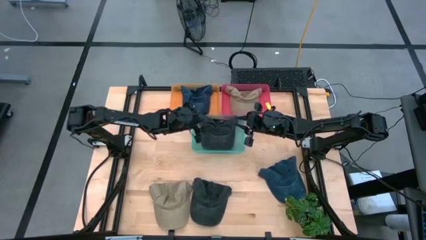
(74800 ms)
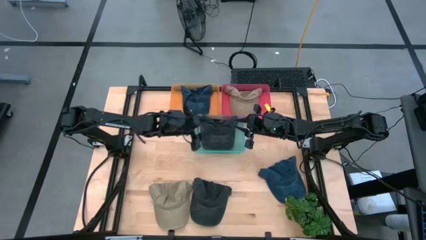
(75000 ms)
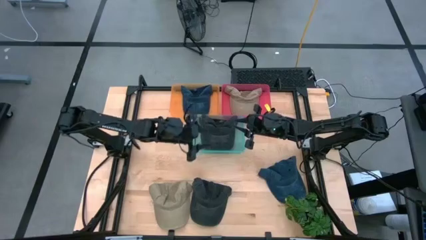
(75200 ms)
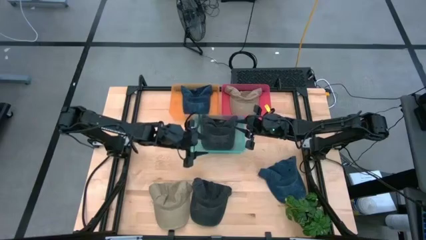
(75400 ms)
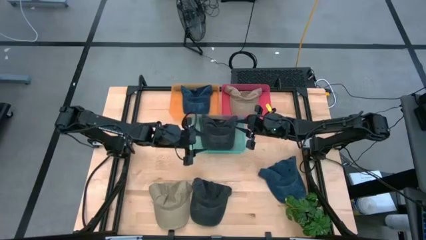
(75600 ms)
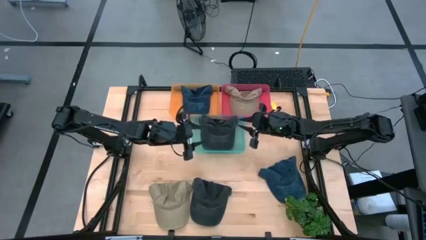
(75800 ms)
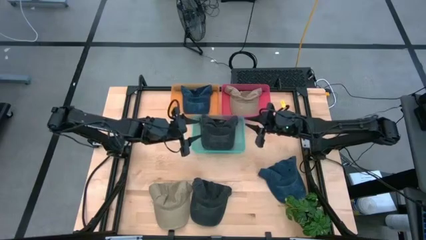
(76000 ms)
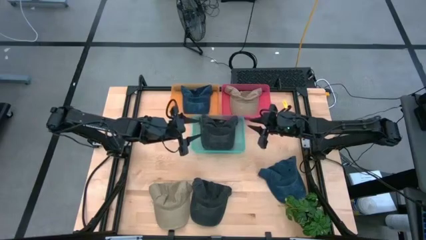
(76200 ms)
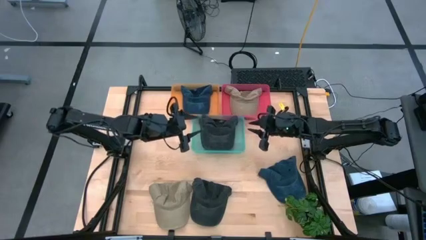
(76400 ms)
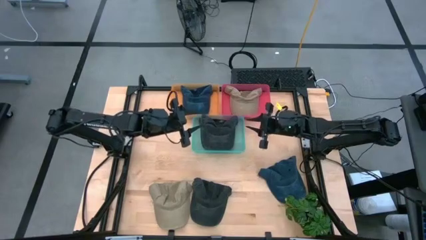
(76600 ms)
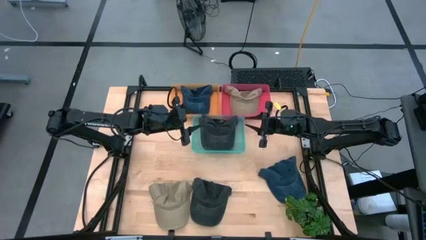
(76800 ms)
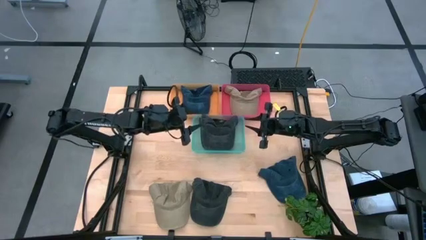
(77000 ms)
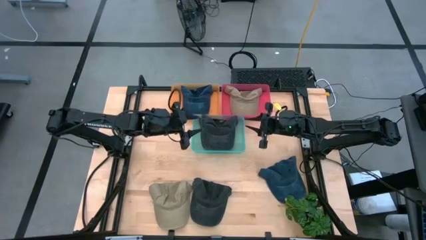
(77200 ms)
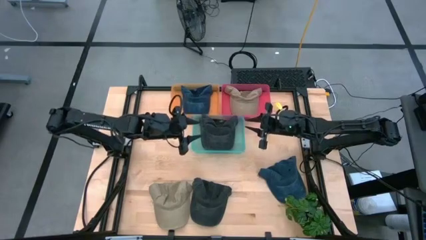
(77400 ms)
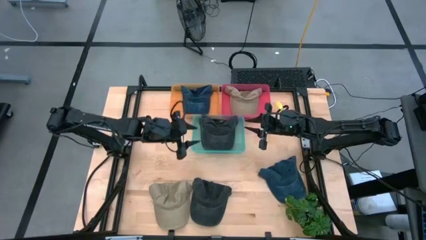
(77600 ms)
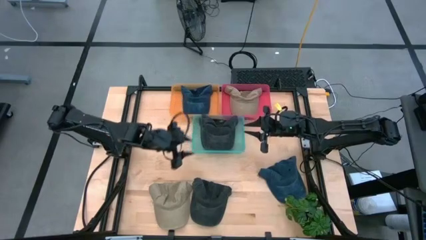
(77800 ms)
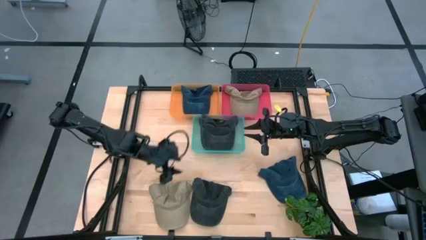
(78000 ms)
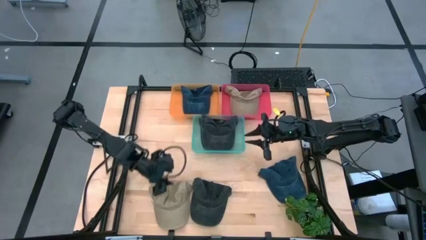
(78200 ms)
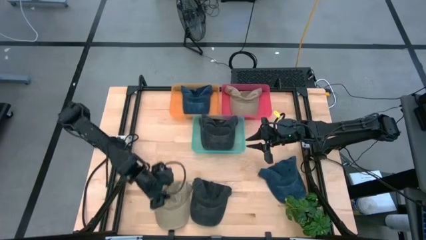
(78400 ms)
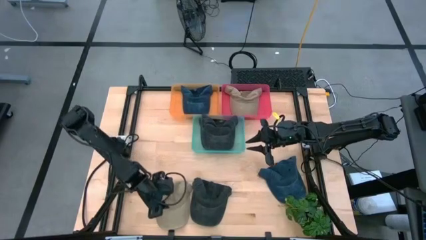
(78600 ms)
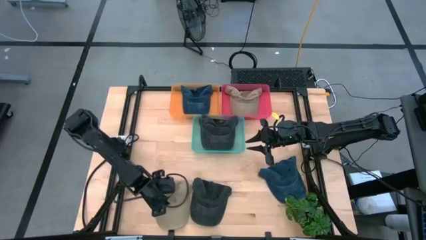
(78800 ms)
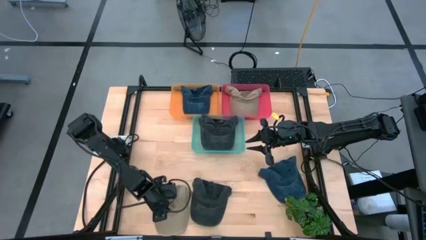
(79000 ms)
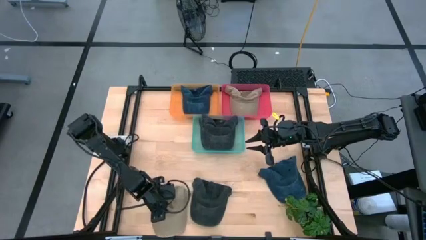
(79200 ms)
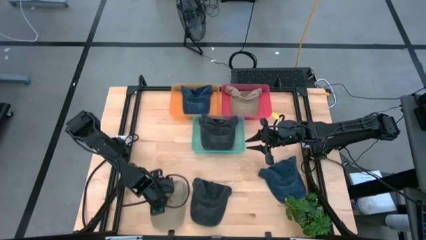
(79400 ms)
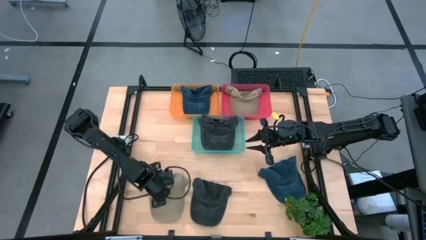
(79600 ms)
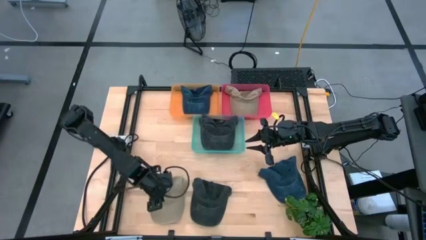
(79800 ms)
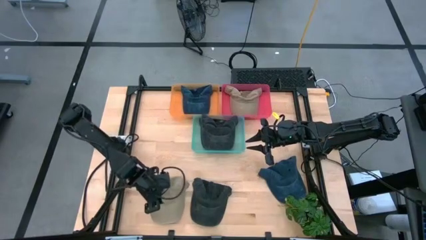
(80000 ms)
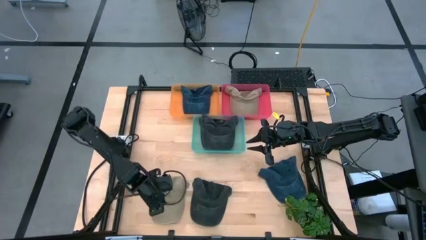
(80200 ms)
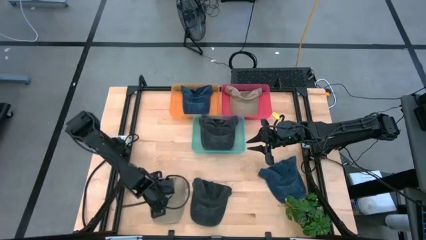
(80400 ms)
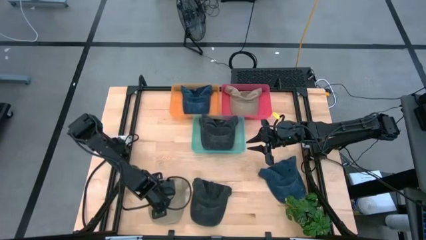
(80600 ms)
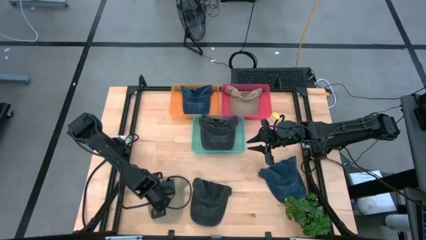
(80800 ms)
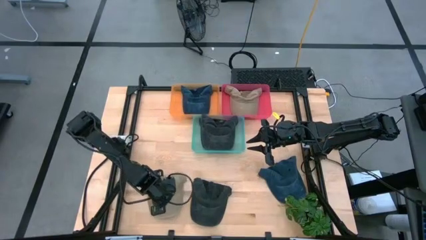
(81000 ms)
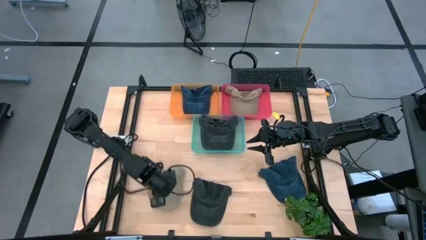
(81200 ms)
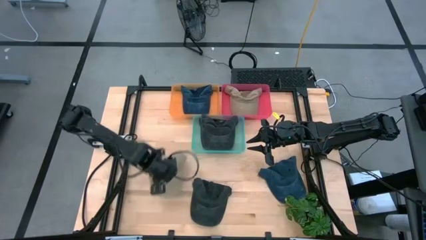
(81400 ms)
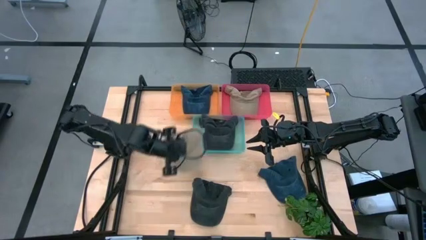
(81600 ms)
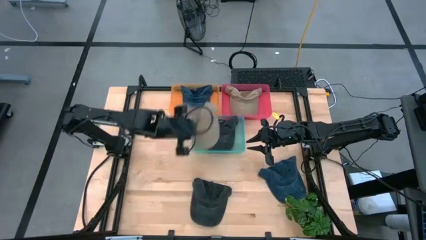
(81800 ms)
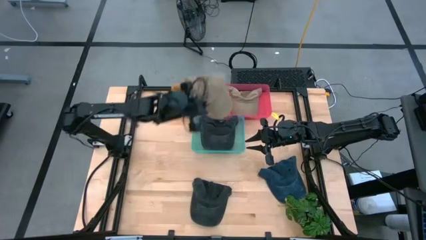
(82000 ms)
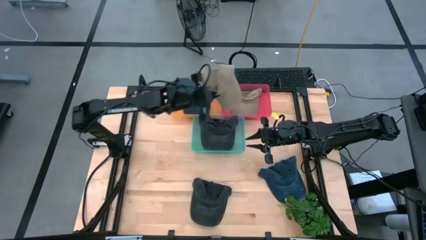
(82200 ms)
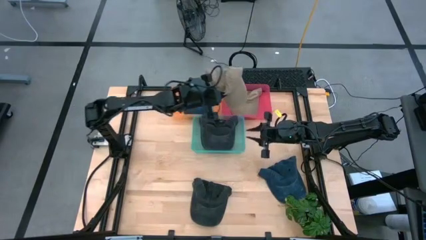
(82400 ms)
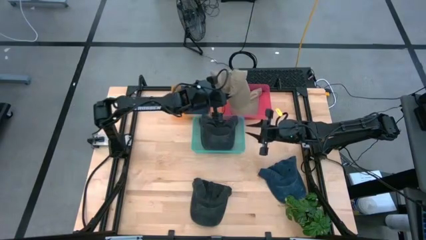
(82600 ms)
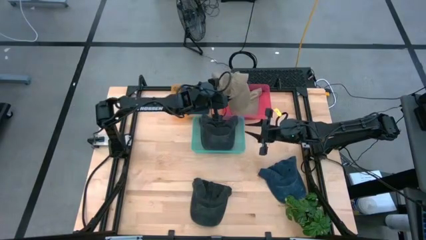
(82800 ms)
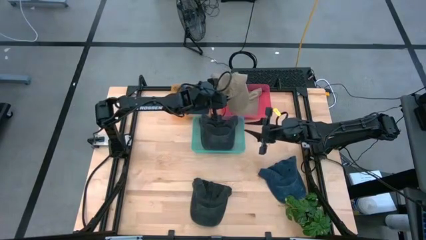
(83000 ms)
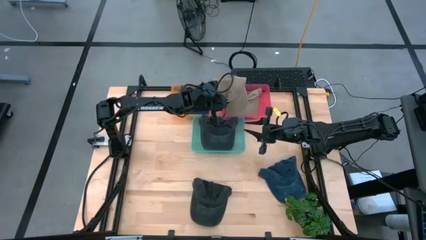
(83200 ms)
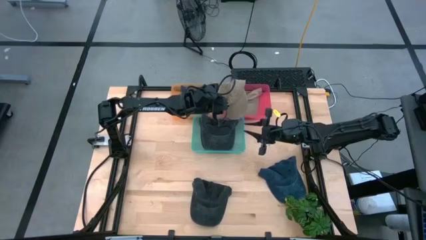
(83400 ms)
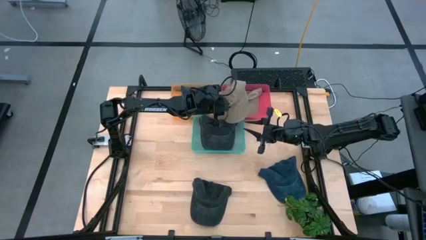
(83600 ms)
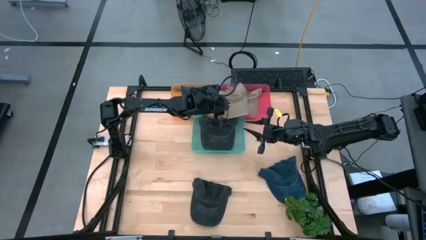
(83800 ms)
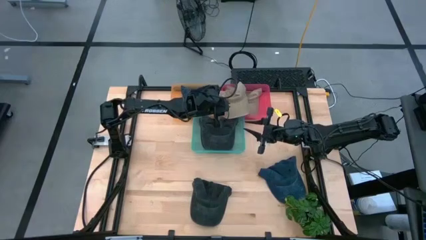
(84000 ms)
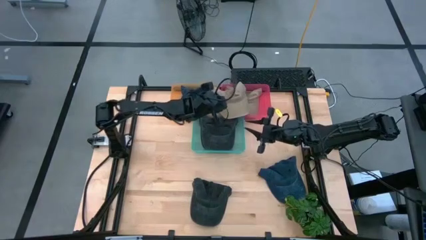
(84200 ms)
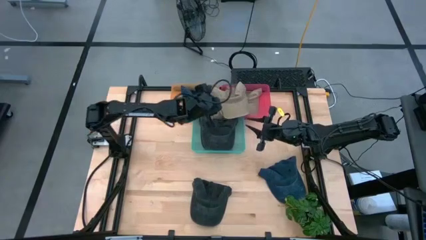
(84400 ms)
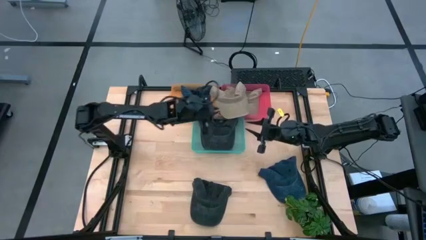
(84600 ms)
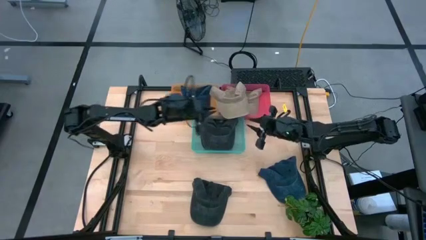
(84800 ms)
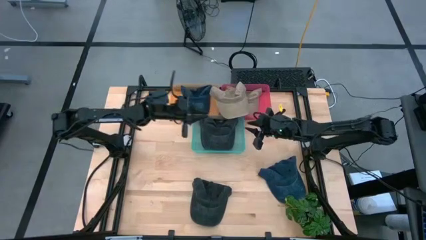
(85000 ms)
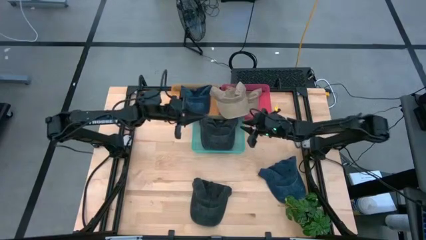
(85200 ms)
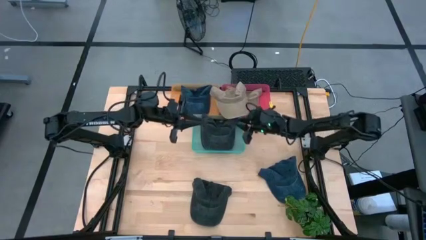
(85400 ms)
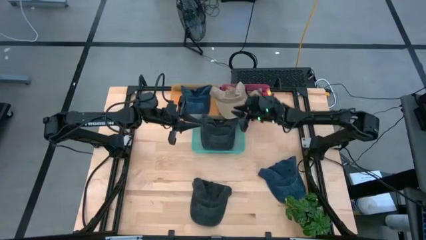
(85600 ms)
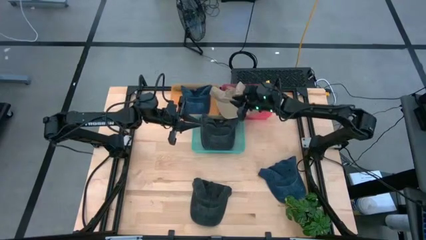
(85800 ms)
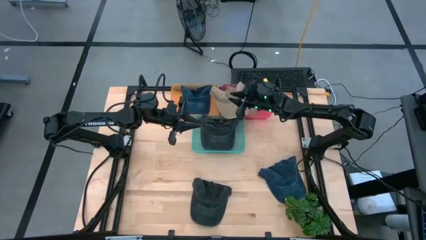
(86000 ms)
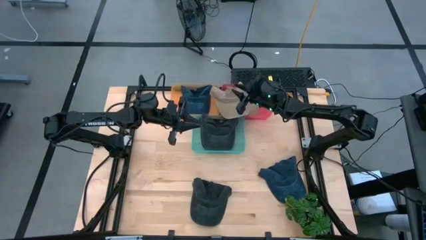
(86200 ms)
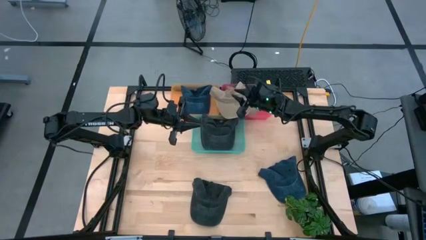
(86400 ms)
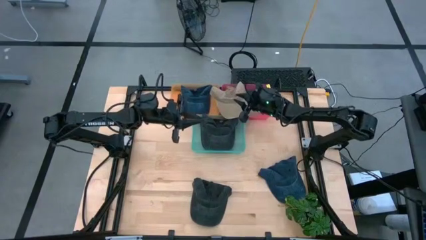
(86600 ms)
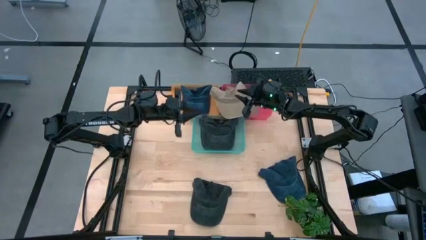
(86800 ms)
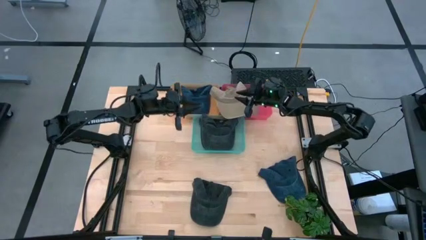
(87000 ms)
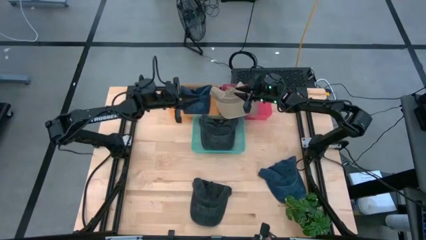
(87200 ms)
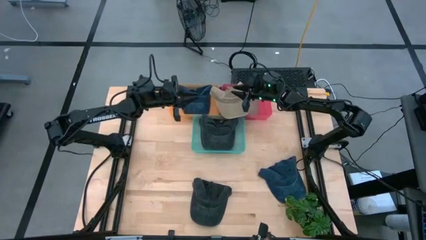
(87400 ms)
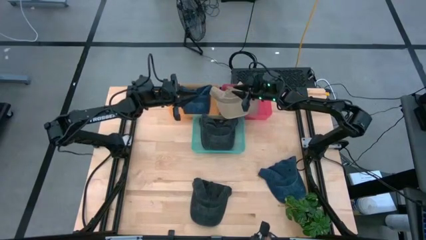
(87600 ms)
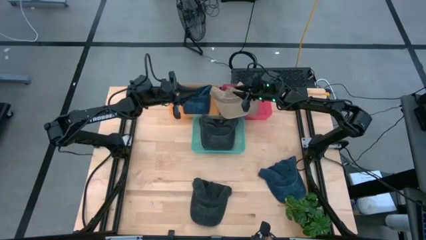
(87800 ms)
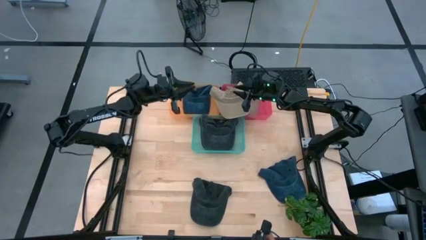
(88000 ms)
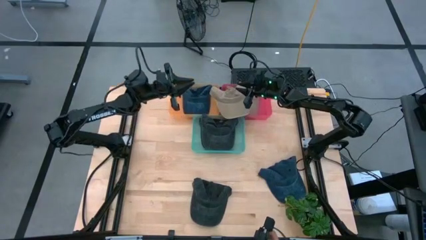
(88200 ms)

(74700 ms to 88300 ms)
Task: Pick & Place hat
Put the brown cap into the pink bin

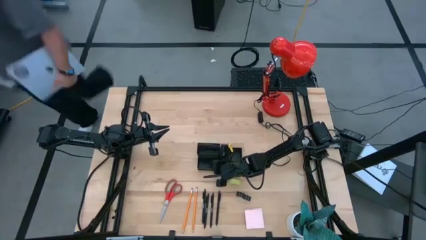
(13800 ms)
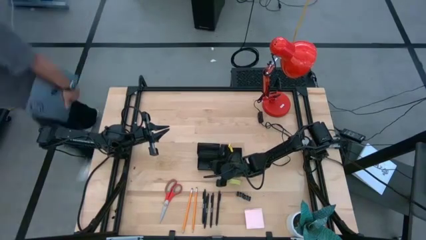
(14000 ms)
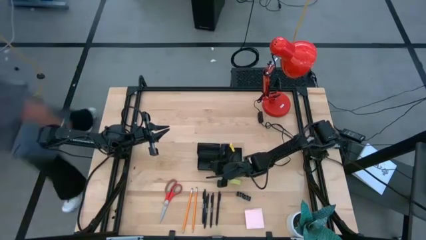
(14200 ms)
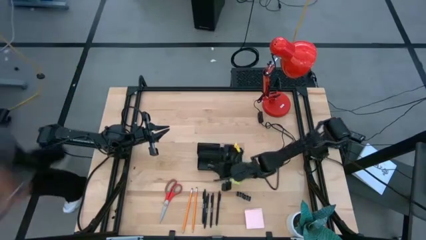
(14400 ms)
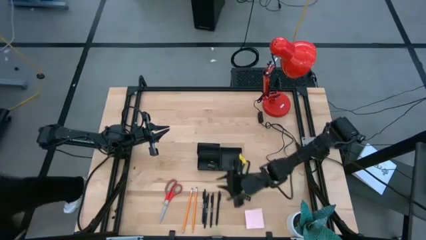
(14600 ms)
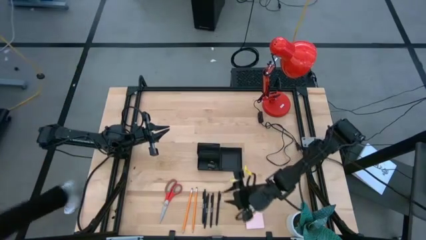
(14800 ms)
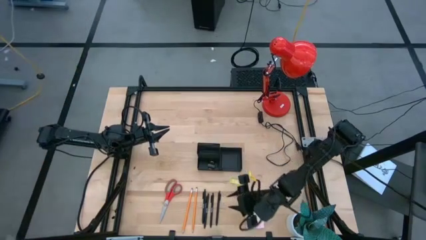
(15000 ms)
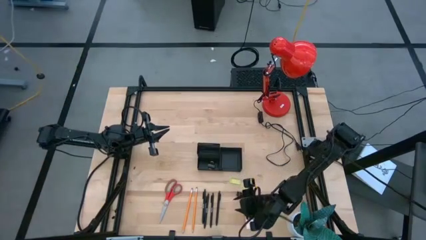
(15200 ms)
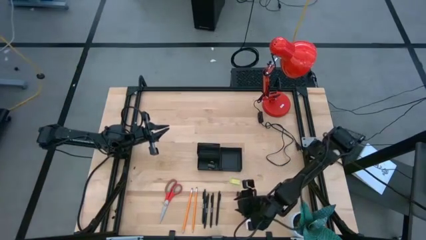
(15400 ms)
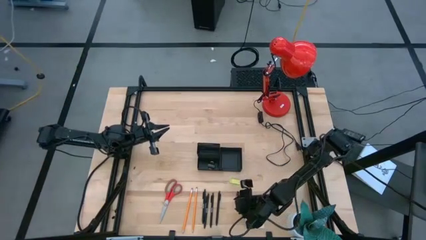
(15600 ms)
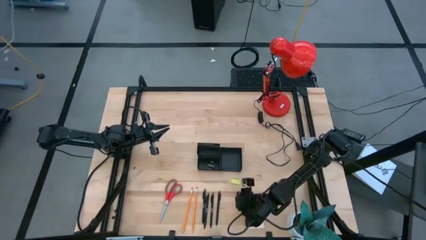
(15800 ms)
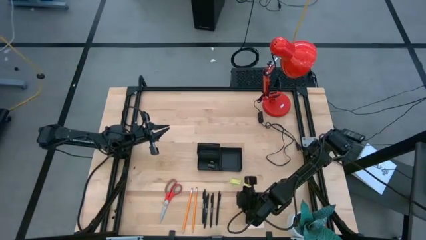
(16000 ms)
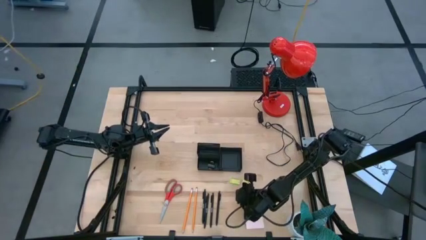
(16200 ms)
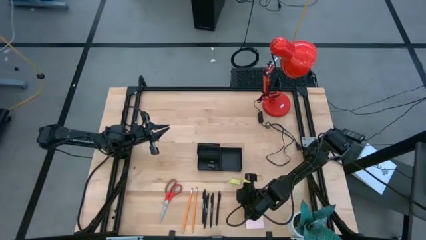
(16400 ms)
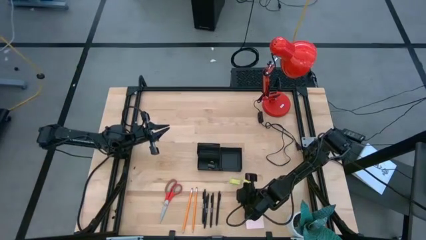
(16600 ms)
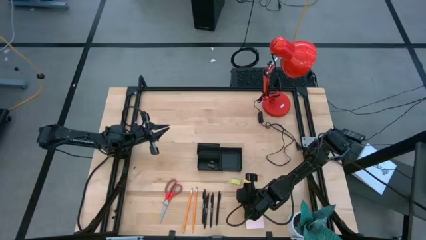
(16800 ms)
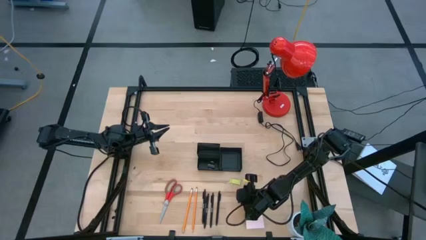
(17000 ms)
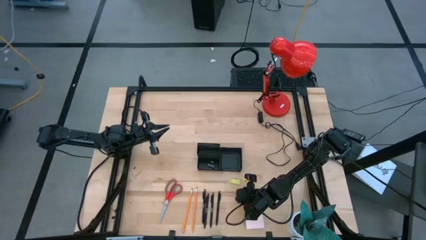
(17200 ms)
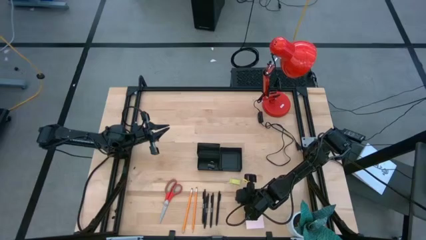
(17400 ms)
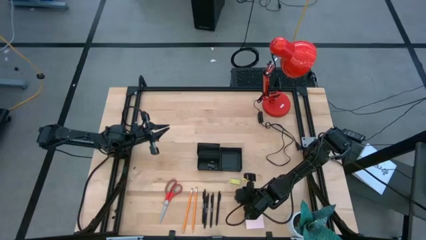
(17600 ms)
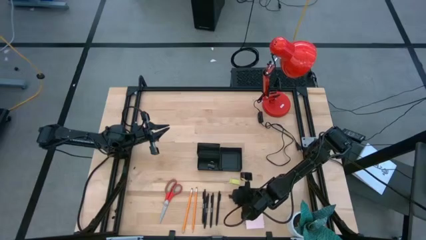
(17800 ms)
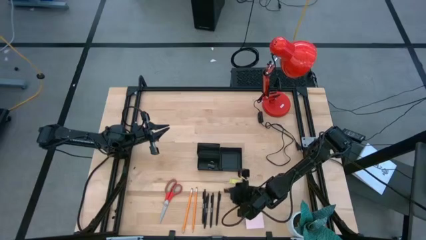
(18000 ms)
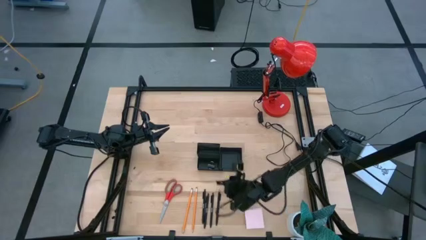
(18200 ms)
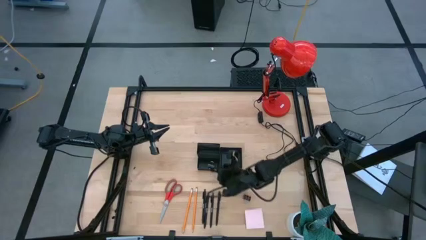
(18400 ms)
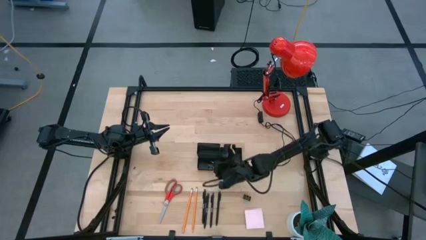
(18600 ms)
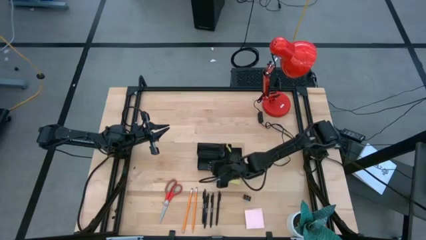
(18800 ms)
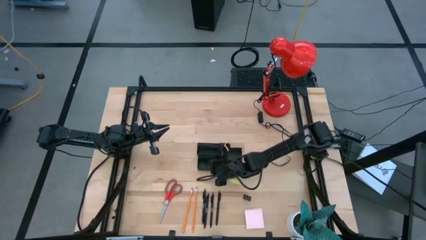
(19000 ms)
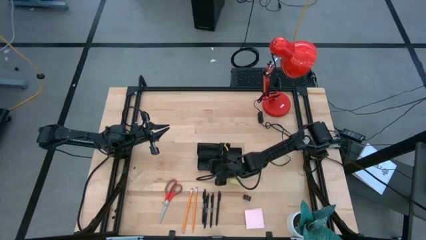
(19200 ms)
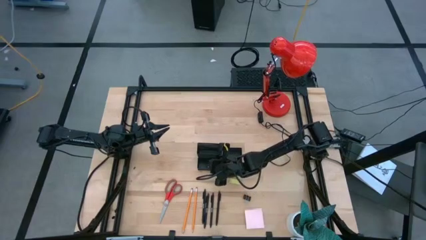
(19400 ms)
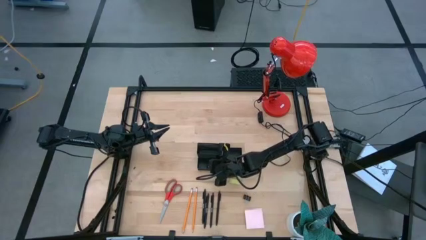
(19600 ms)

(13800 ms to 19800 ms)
Task: Pick and place office supplies into organizer
Put the black binder clip into the black desk organizer
